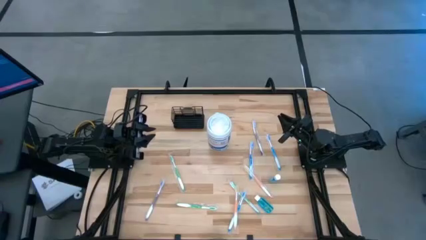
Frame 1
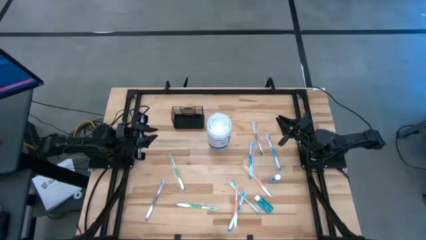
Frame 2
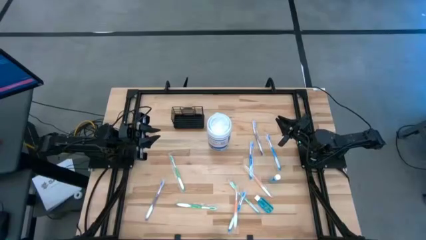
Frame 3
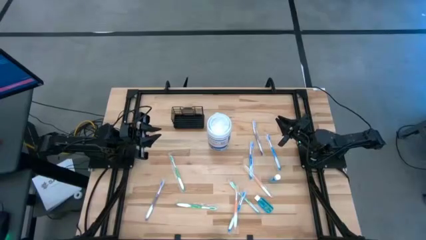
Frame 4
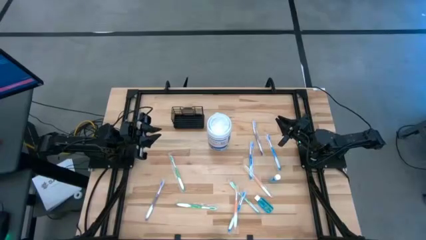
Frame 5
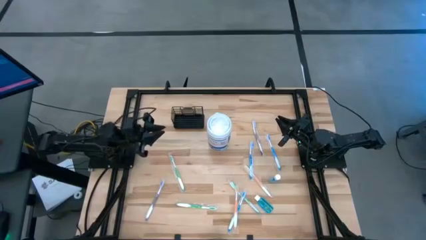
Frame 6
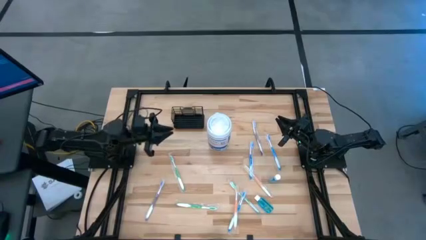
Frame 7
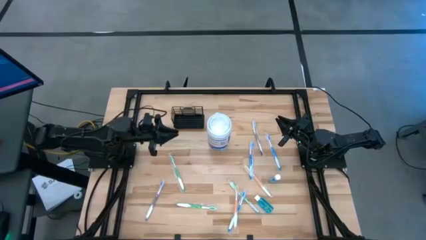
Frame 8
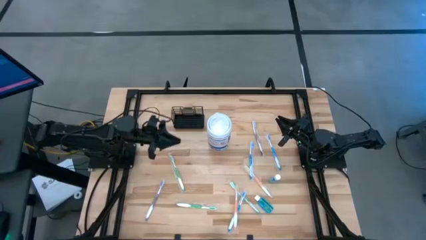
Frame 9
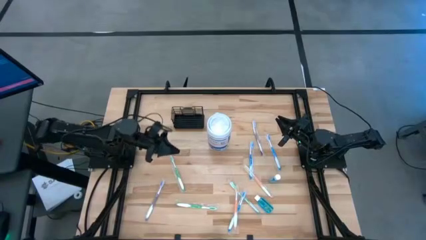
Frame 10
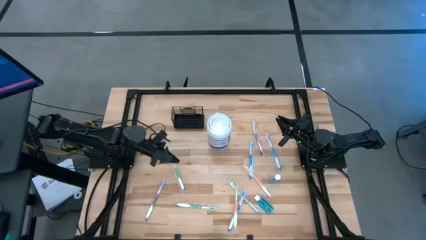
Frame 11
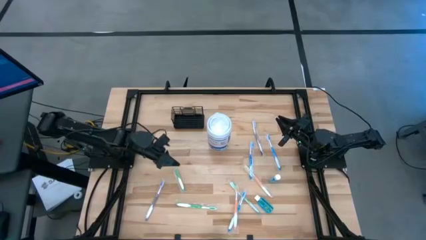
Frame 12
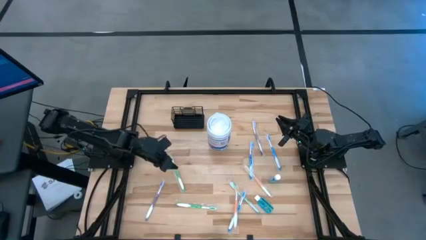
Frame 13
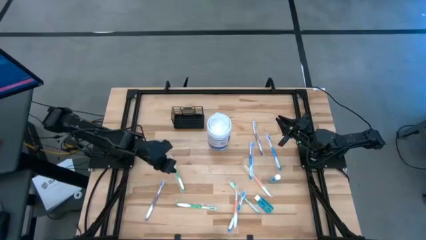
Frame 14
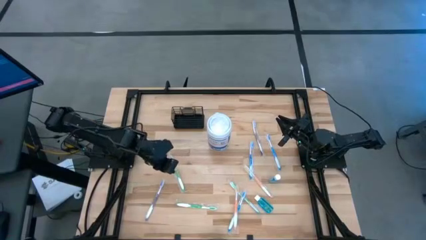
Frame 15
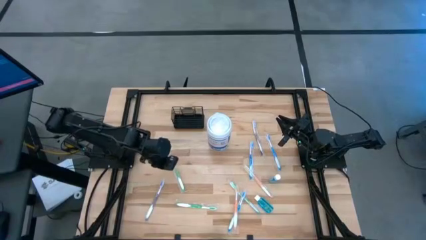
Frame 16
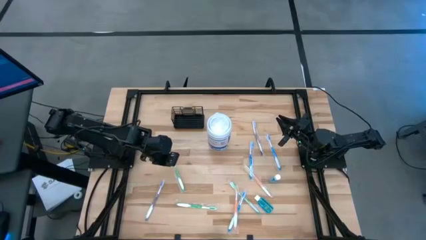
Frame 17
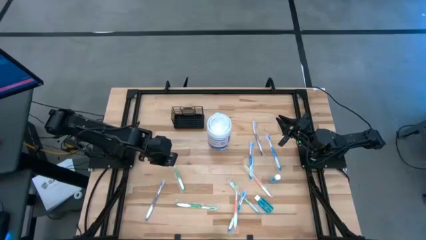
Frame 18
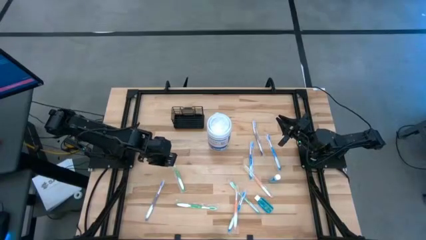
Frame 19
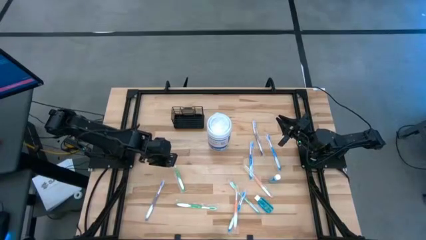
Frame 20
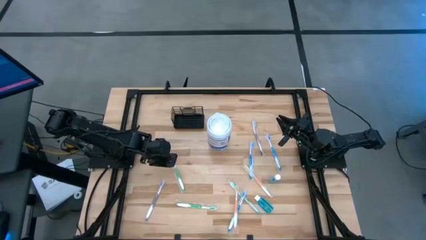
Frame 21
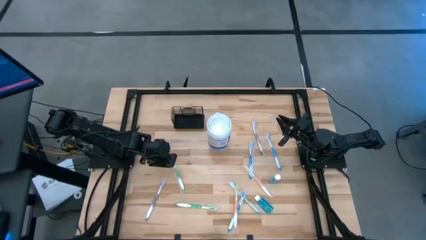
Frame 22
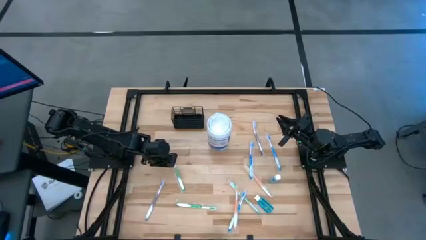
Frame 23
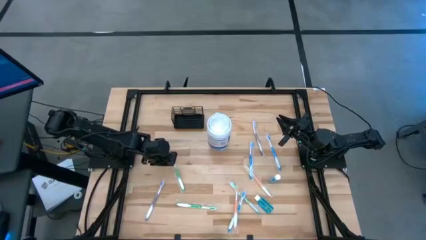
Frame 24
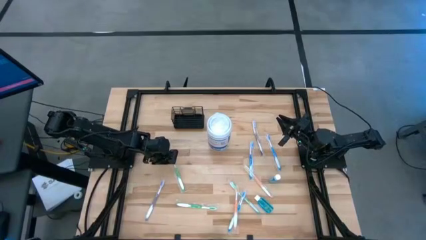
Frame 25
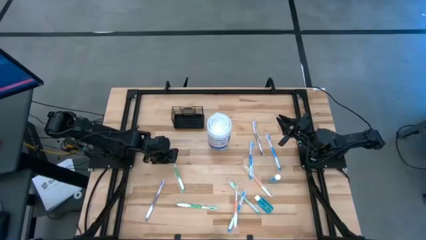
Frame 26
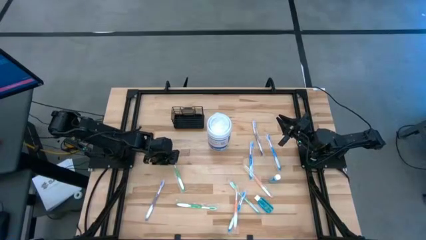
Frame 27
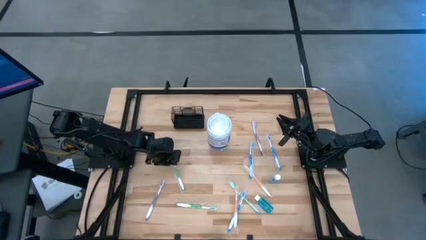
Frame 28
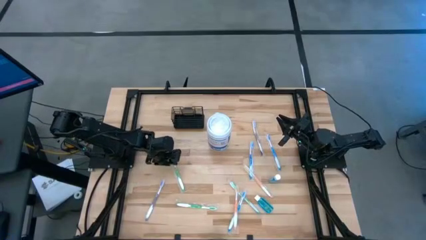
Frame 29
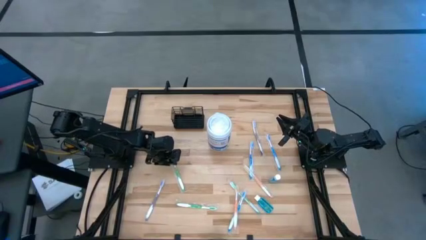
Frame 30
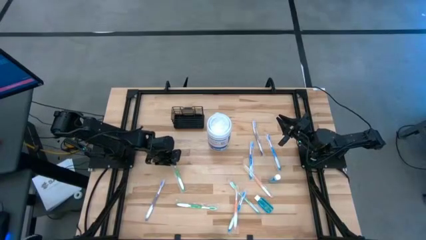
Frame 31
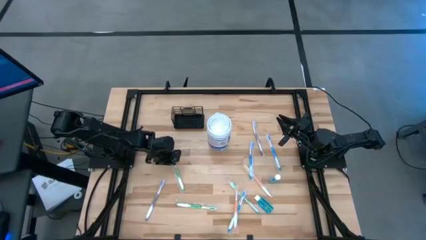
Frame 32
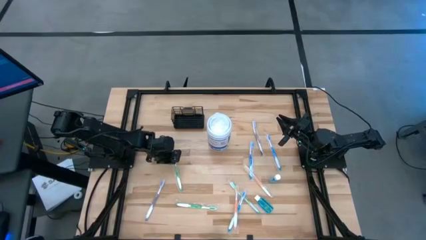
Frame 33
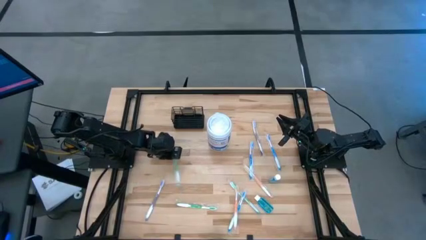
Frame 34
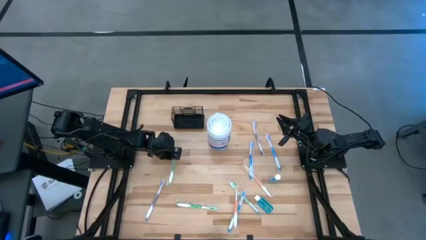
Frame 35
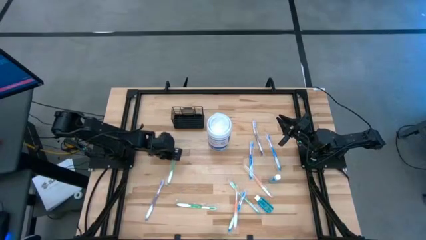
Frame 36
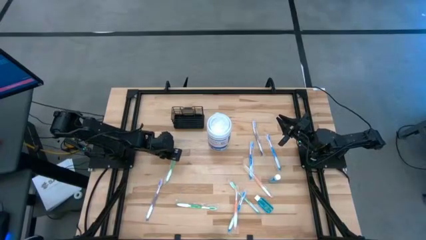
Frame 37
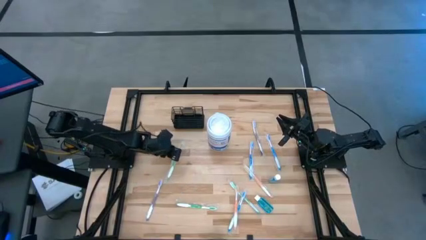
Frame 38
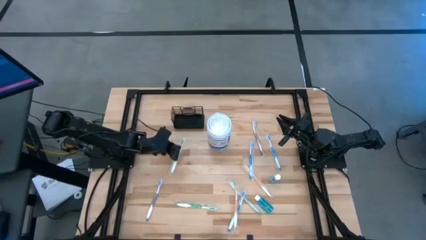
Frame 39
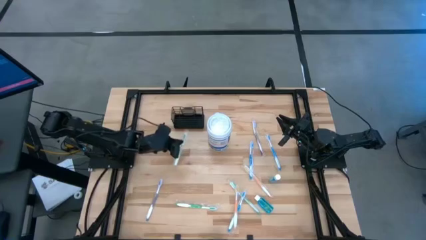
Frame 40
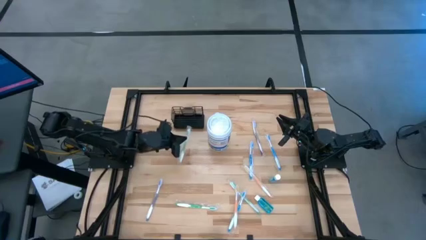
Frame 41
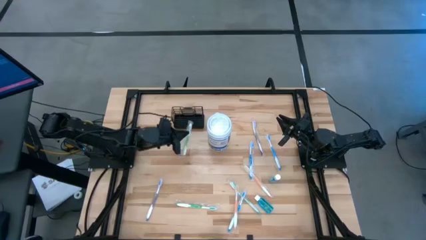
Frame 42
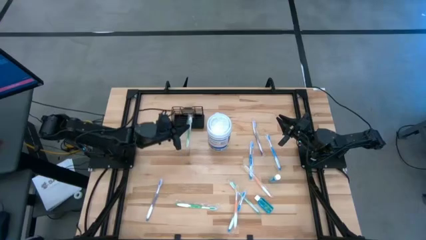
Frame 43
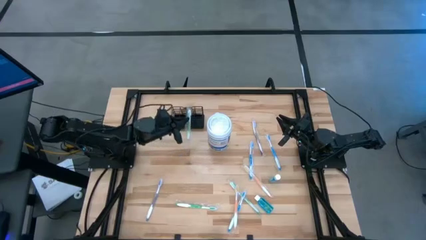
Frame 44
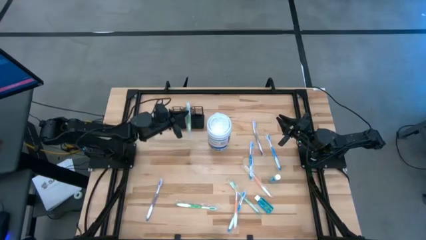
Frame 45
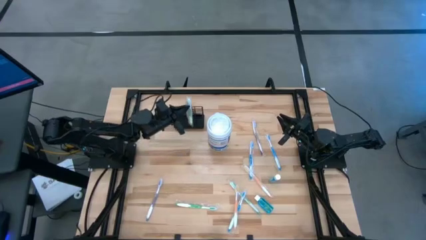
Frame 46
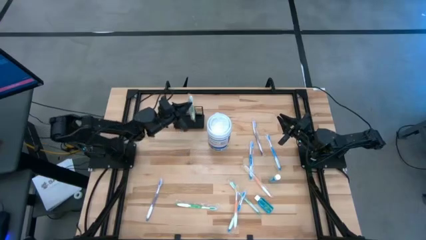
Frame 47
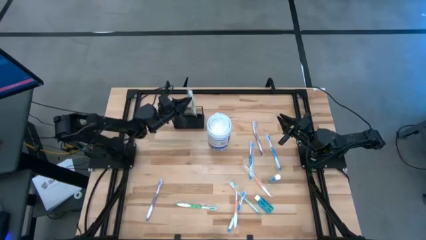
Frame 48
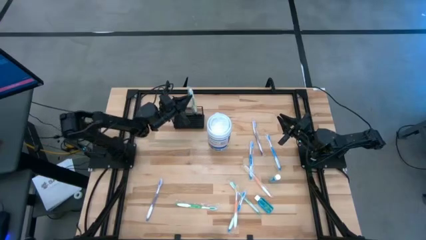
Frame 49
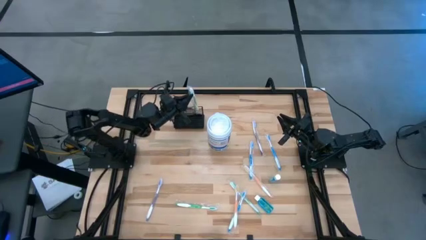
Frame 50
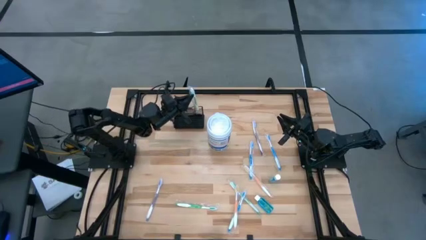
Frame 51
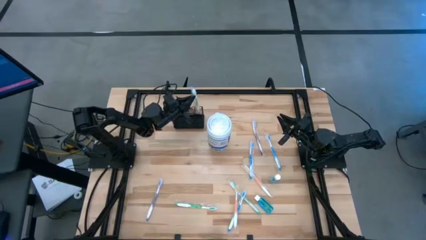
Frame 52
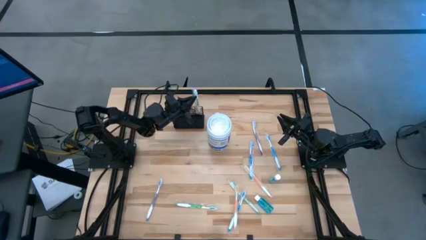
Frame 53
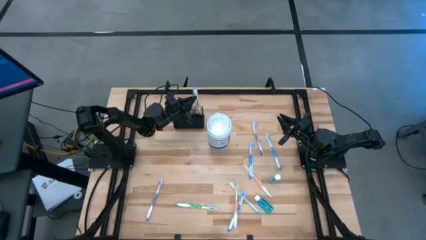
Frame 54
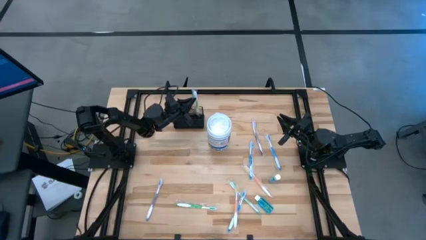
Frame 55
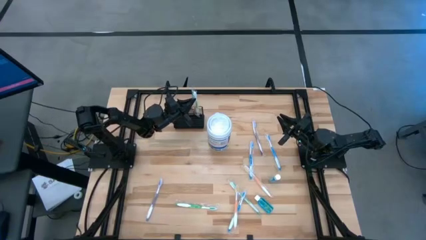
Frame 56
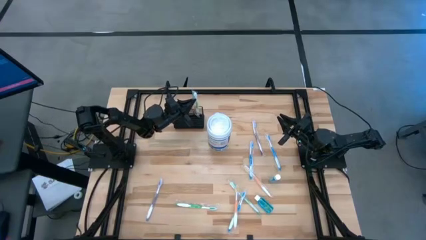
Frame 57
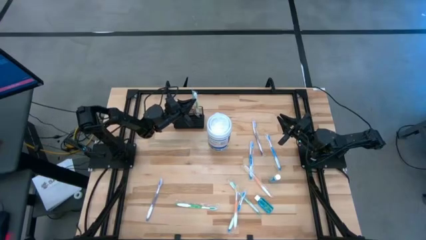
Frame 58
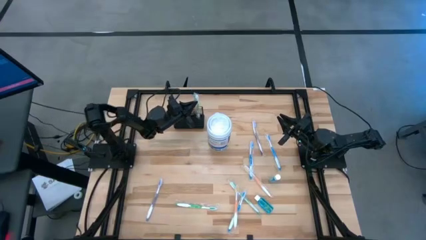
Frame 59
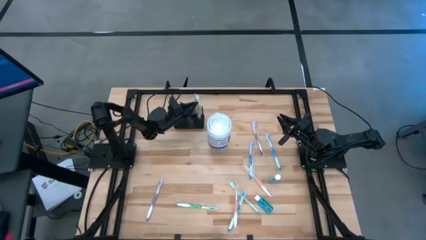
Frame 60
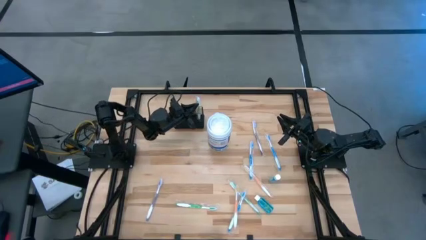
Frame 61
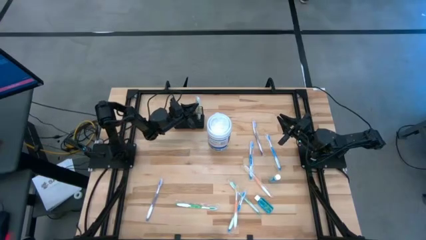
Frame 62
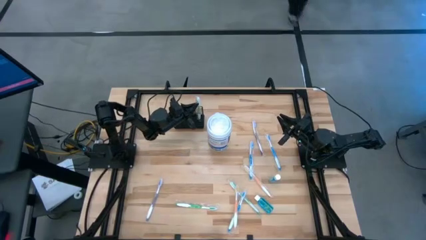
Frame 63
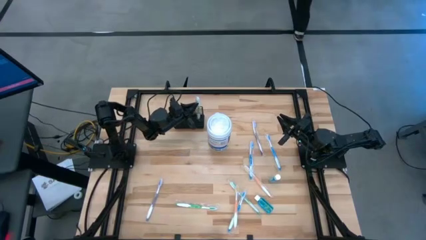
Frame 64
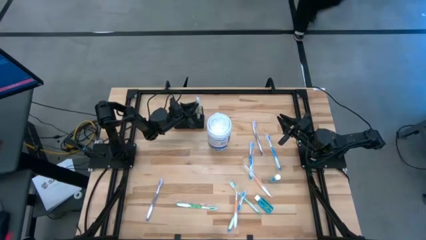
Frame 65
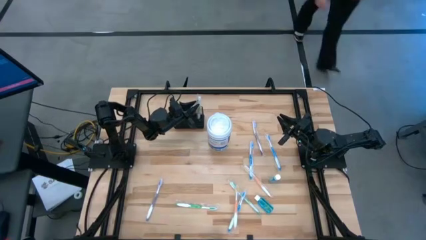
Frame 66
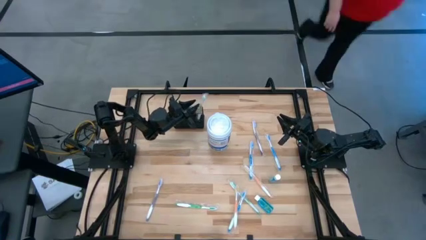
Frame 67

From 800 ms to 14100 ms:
Task: Pick & Place toothbrushing station
Put the top green toothbrush into the mesh organizer
